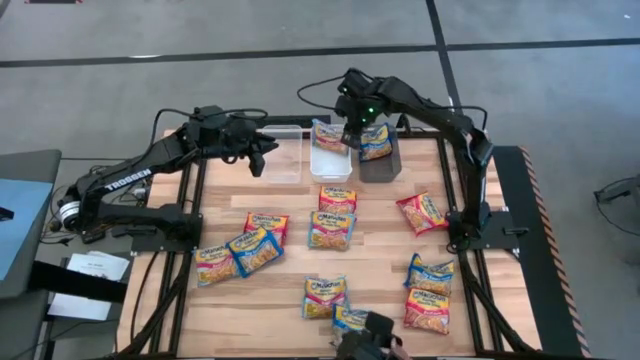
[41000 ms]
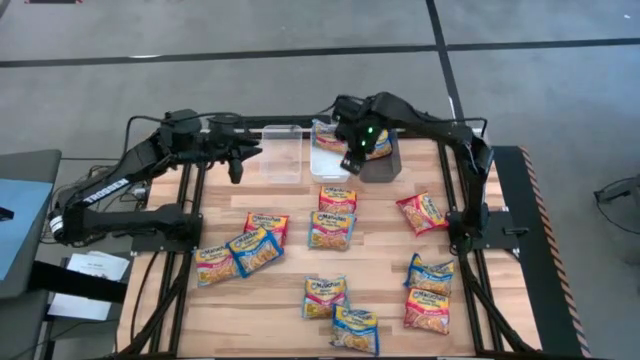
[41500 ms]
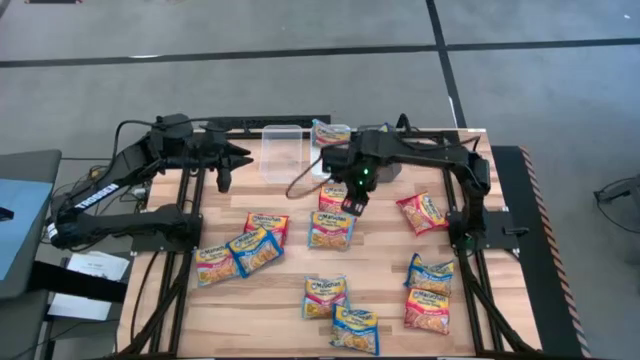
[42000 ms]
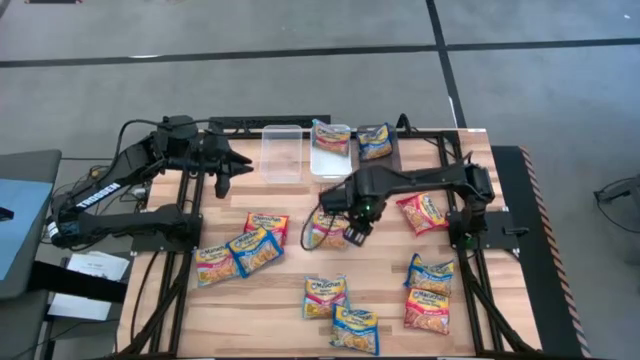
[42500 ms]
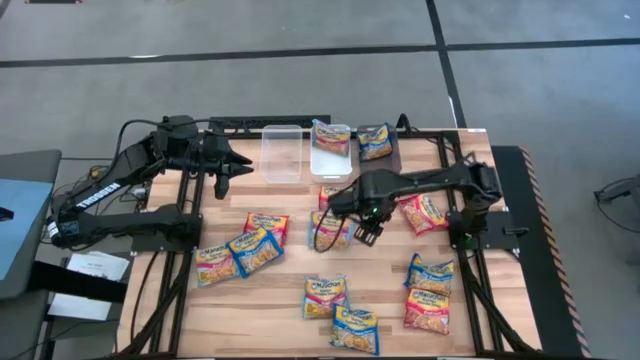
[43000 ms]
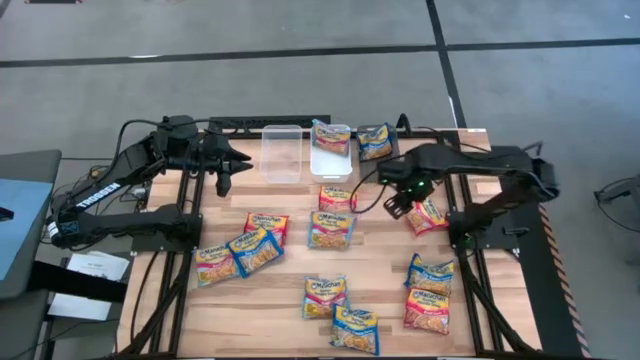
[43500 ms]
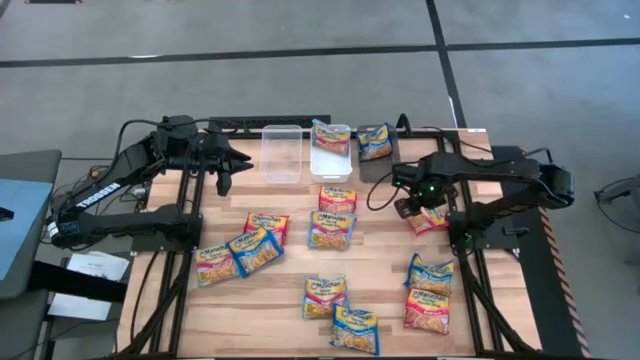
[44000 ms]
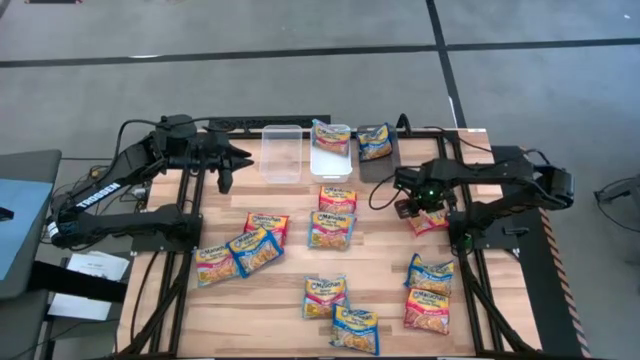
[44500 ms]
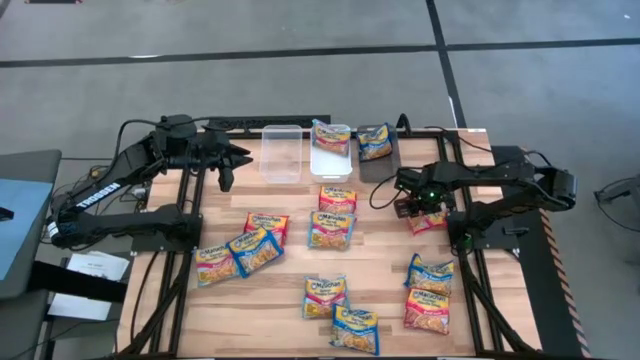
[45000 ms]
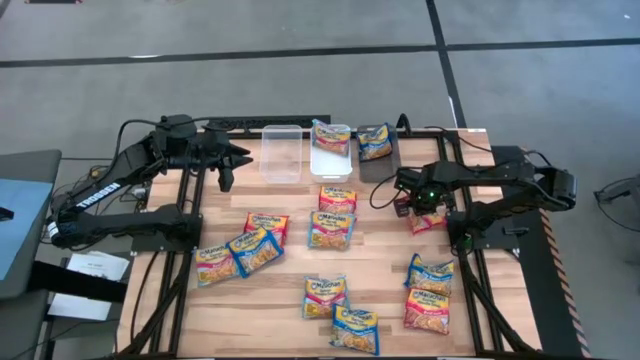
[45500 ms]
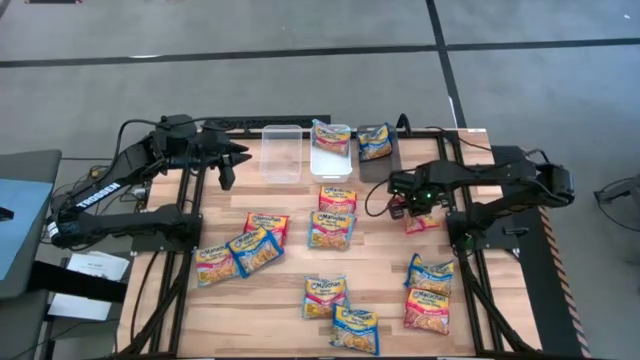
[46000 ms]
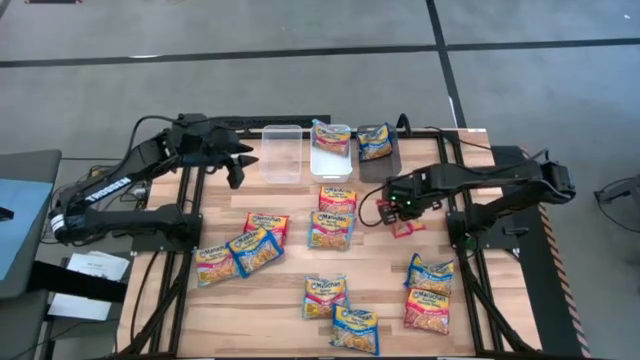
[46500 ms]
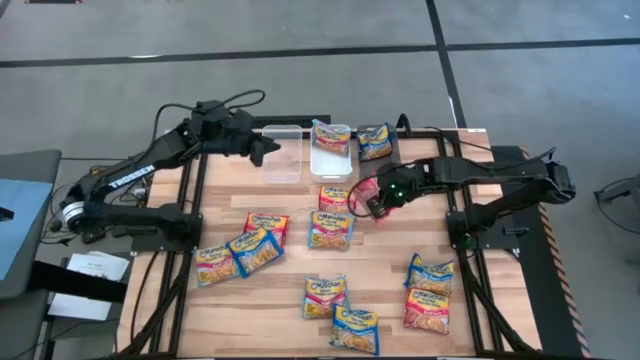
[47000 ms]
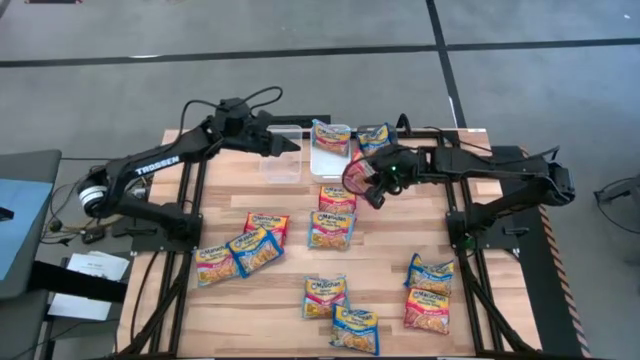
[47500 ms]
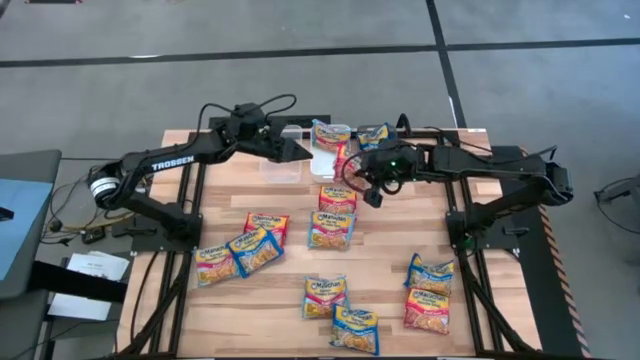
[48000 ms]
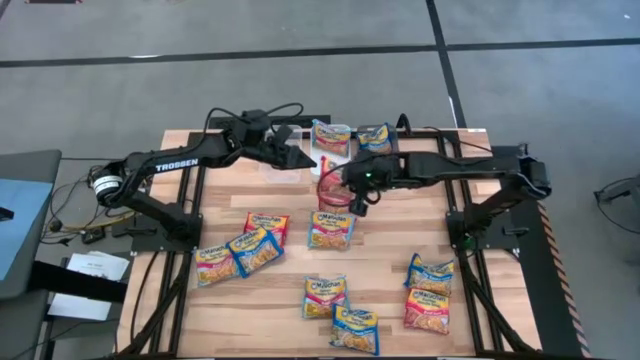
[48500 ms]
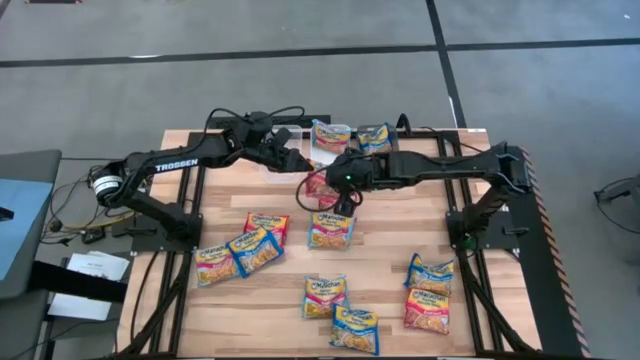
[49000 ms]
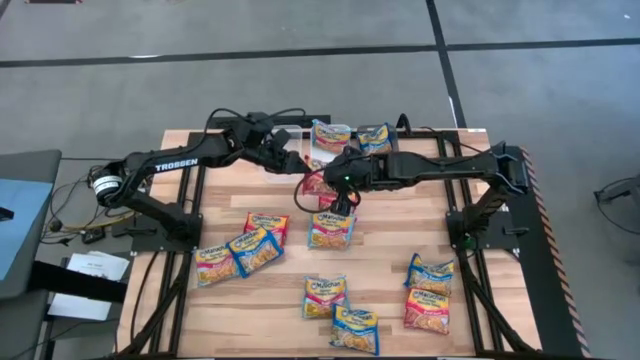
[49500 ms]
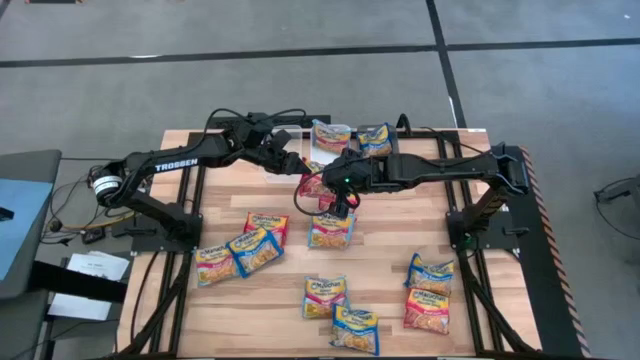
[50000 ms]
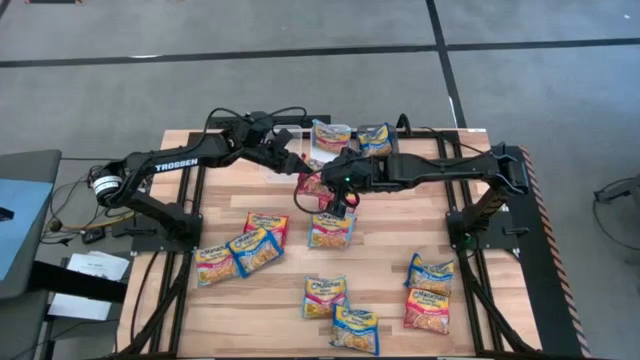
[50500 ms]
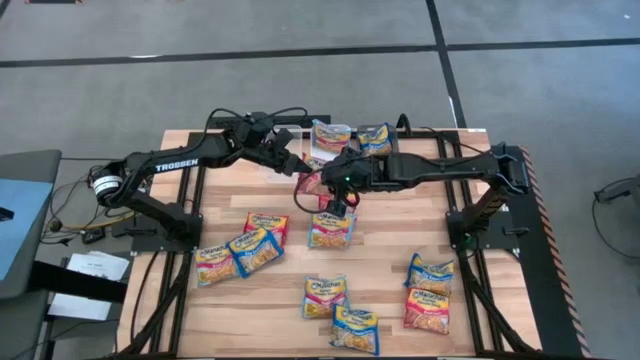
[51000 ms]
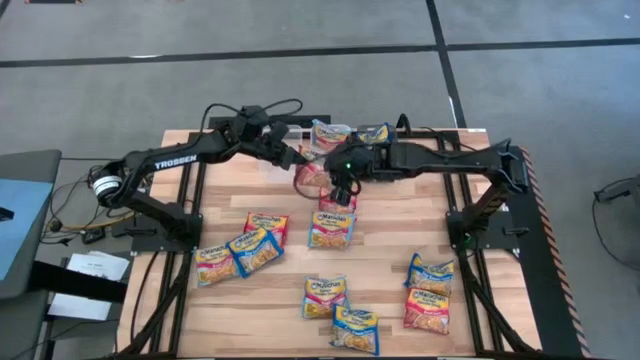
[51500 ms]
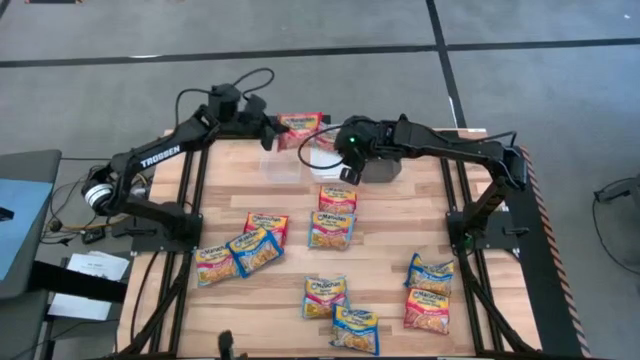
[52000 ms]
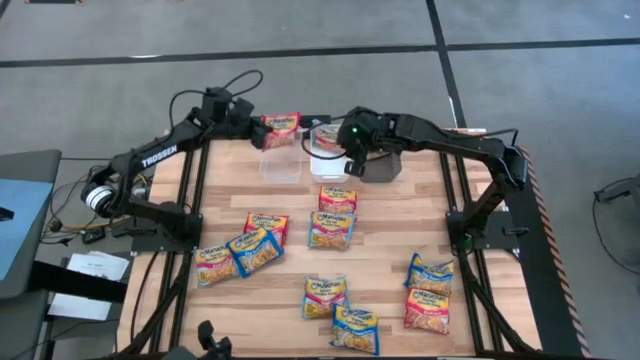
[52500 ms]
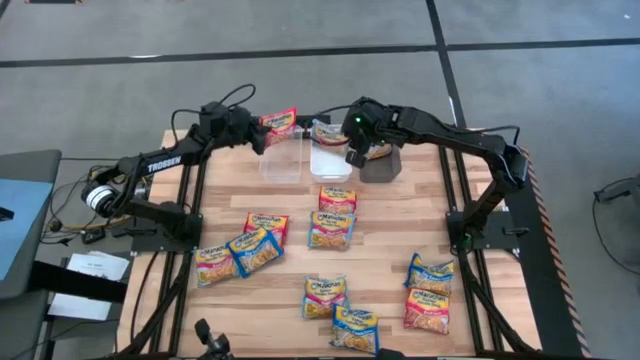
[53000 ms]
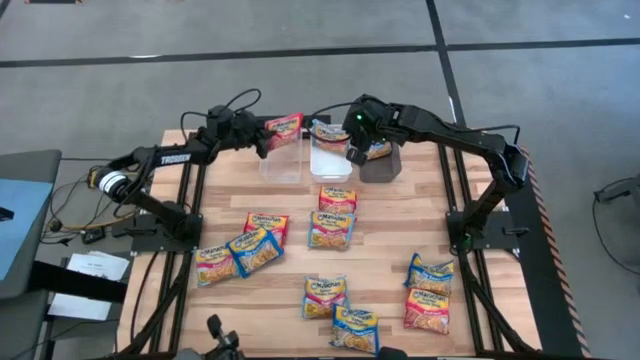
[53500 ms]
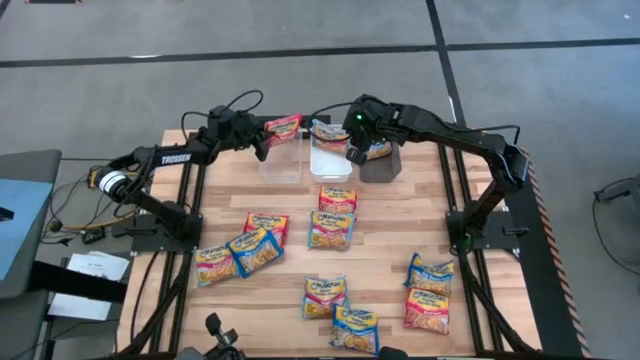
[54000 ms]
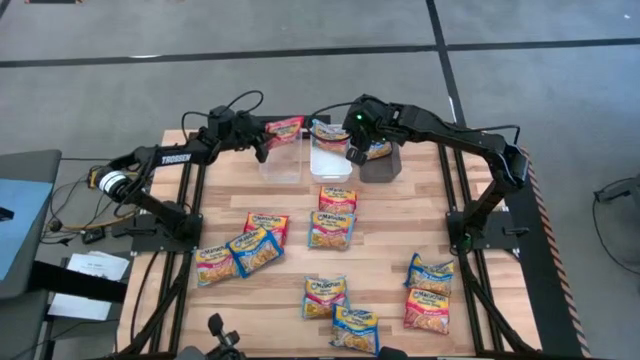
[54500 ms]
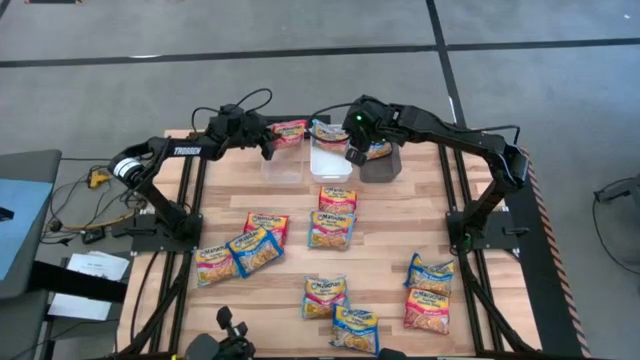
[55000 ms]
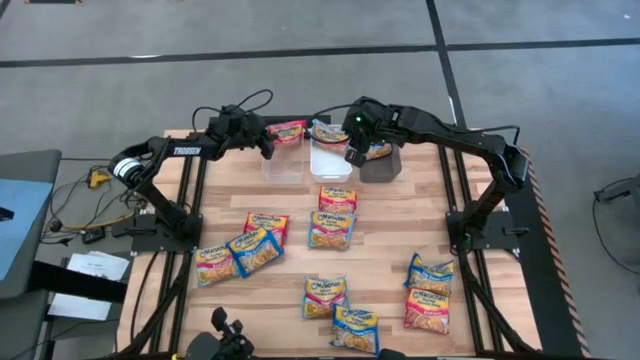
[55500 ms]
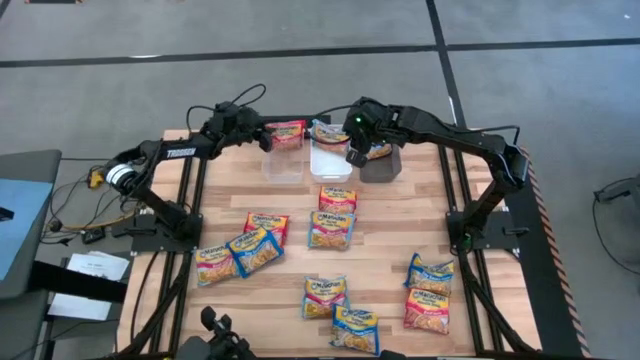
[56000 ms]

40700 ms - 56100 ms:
Task: Sort Maruchan noodles
Put the red noodle pack into the transparent bin

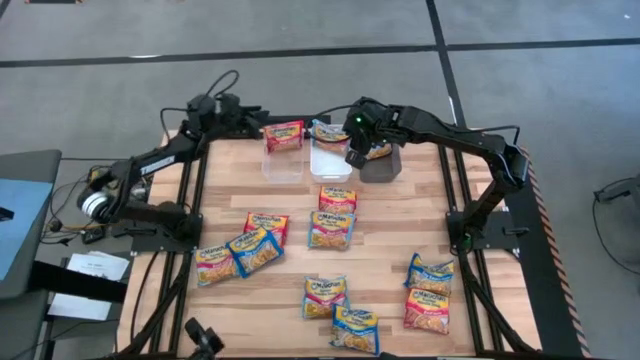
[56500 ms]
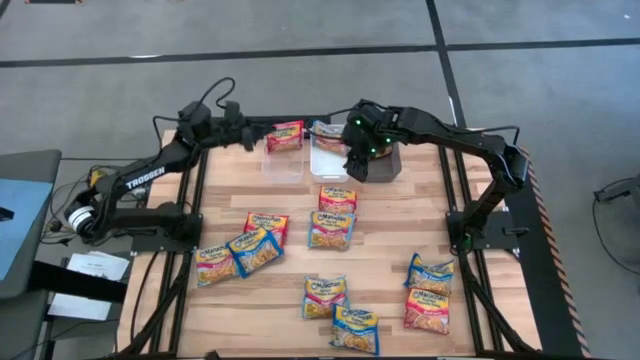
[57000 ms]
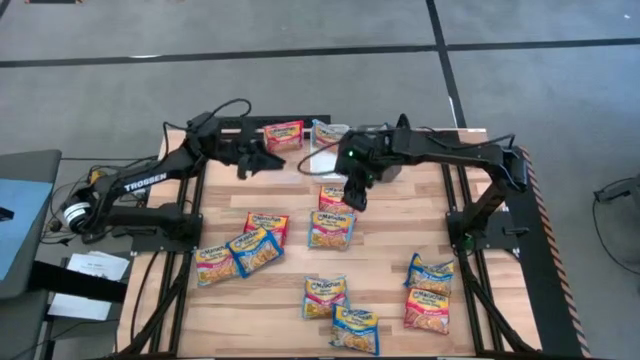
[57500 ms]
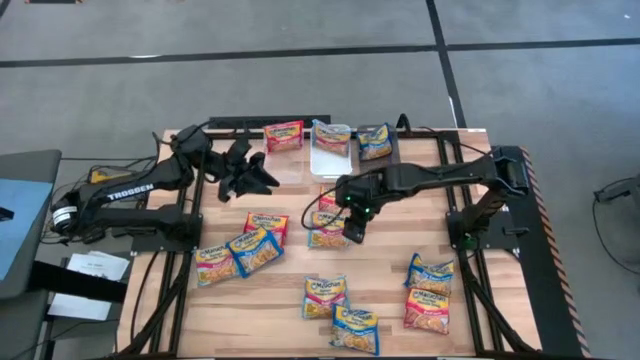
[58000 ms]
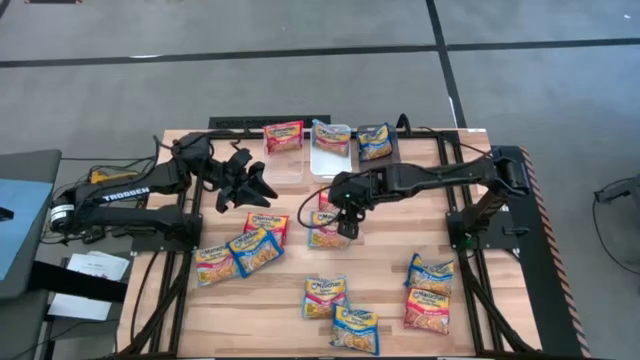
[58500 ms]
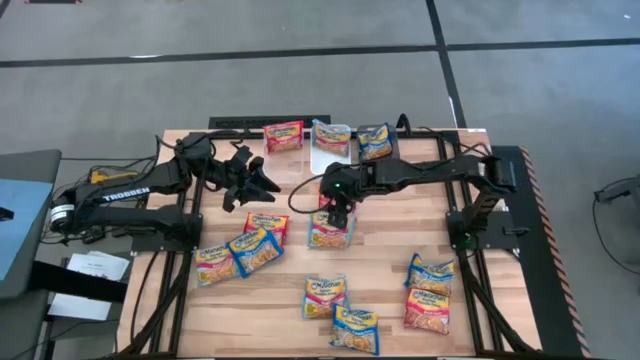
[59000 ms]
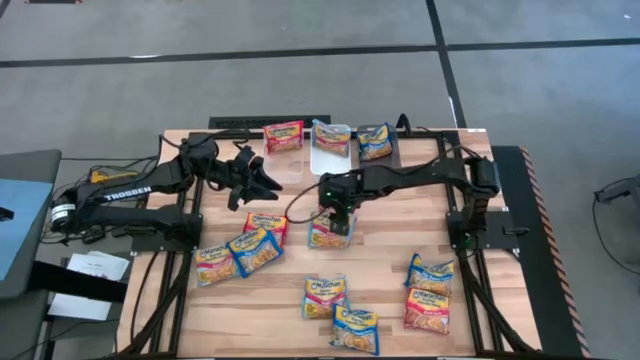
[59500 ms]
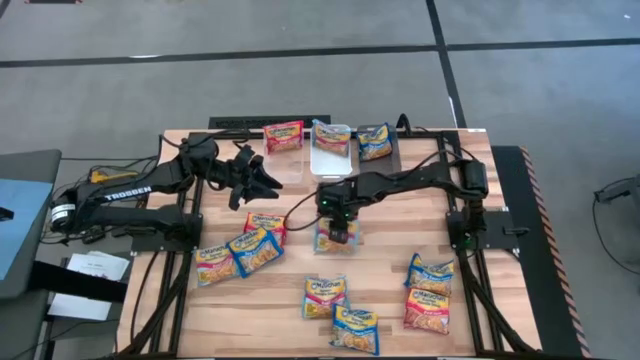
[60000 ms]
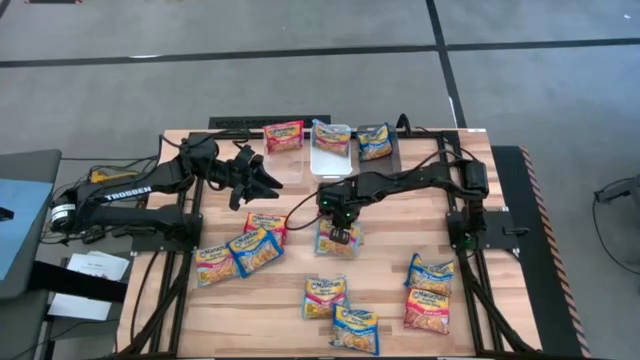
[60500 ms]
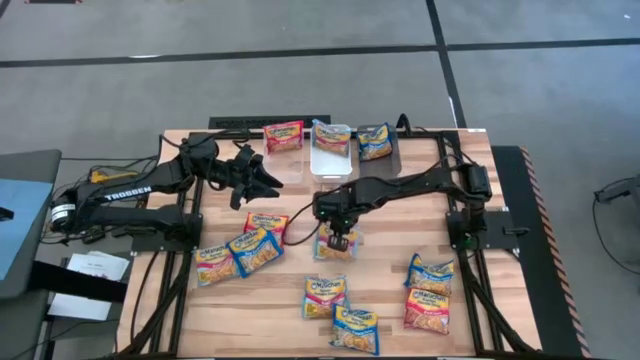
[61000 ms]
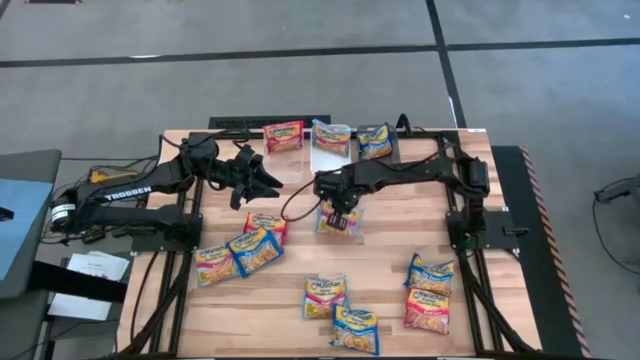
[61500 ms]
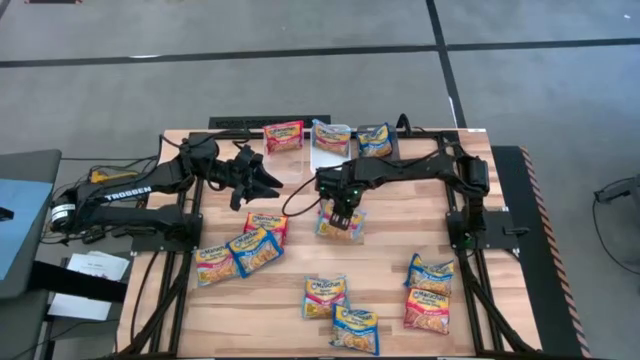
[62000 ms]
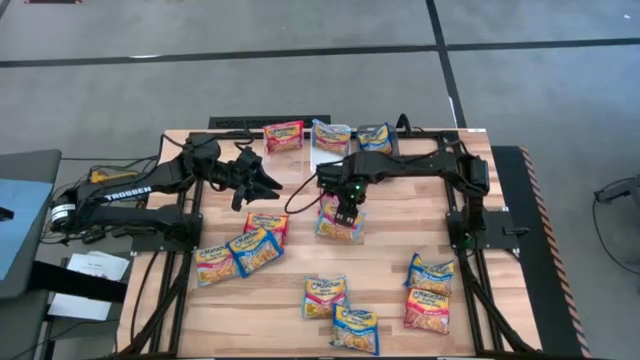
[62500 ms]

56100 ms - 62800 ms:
Put the light blue noodle pack into the white bin
